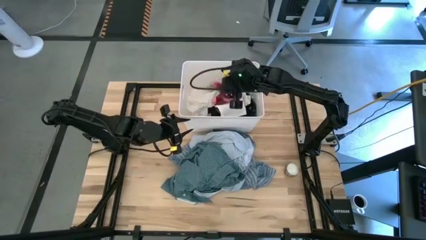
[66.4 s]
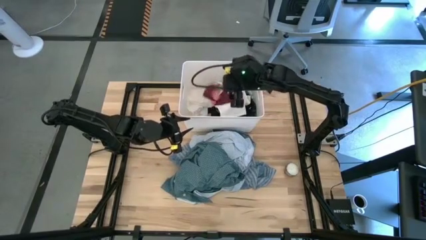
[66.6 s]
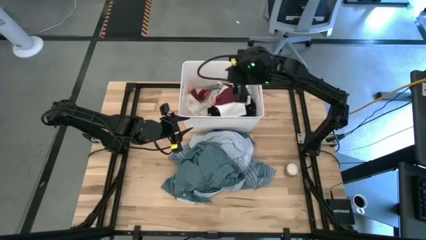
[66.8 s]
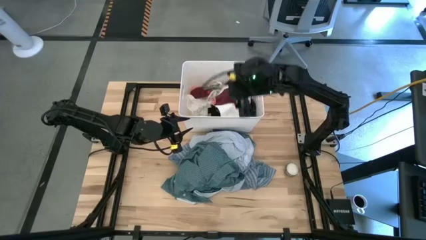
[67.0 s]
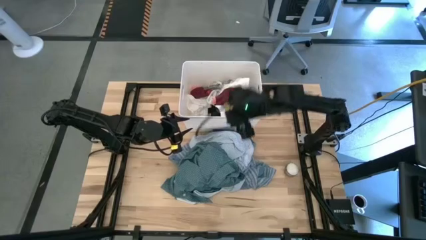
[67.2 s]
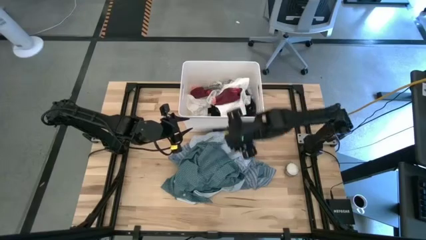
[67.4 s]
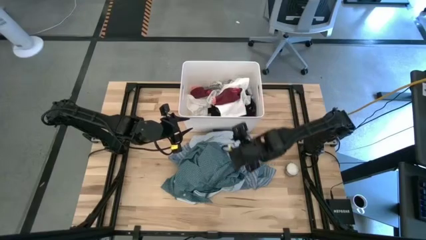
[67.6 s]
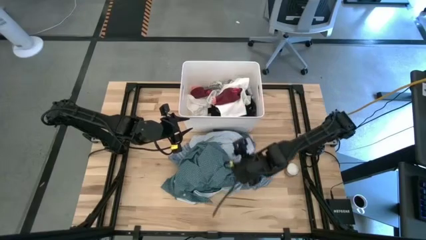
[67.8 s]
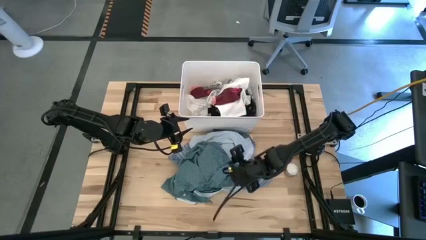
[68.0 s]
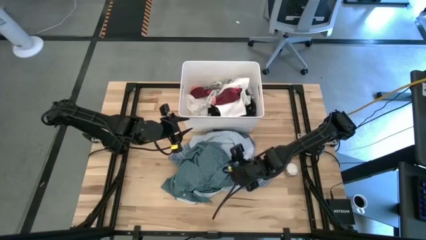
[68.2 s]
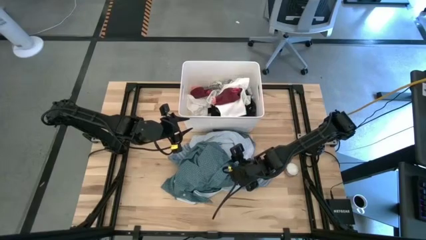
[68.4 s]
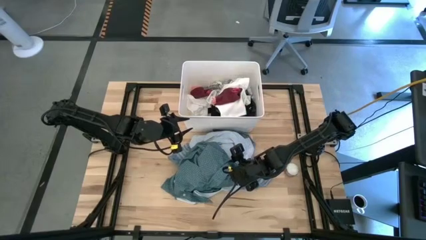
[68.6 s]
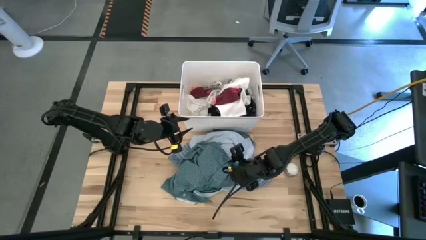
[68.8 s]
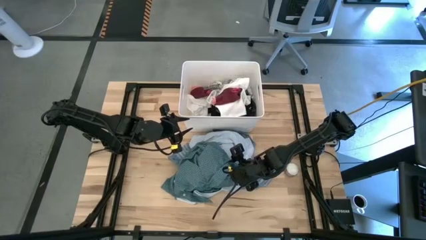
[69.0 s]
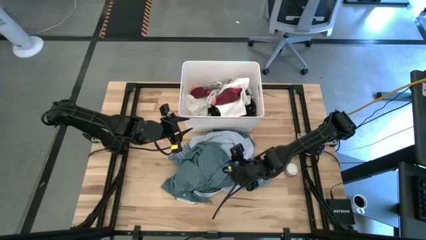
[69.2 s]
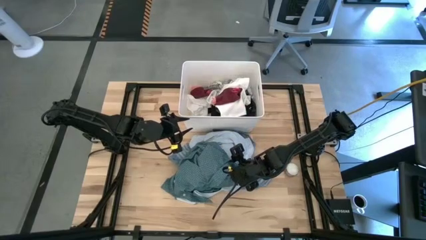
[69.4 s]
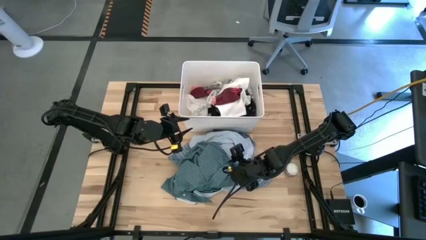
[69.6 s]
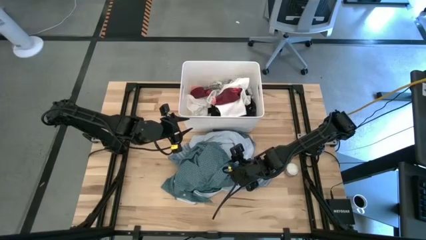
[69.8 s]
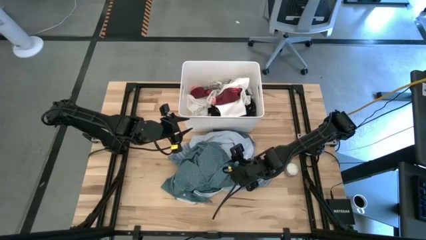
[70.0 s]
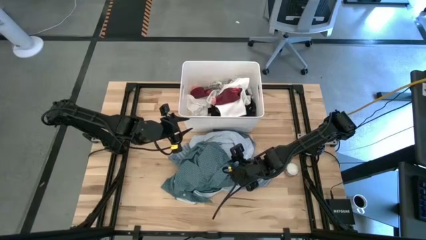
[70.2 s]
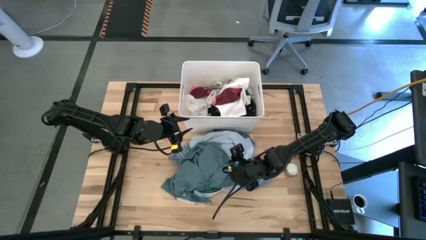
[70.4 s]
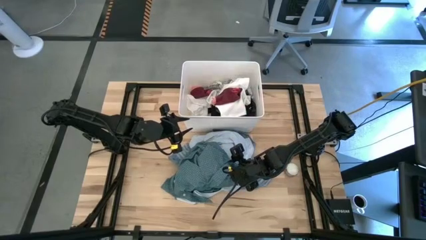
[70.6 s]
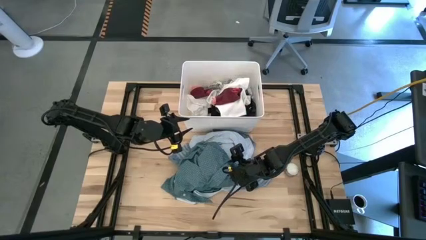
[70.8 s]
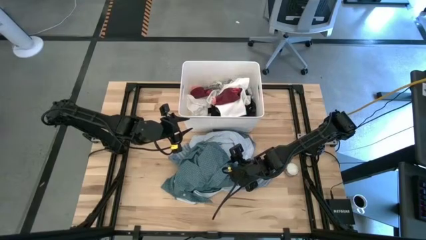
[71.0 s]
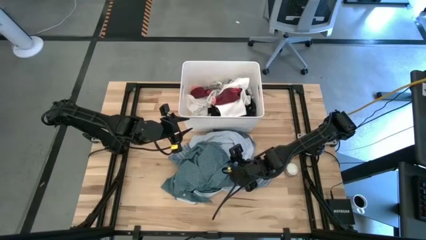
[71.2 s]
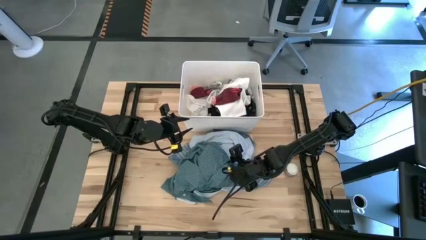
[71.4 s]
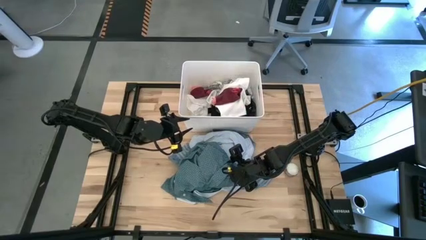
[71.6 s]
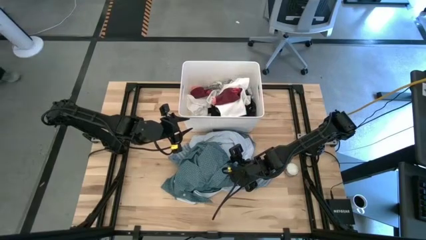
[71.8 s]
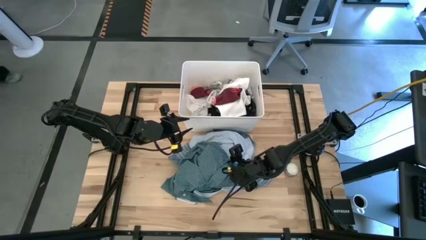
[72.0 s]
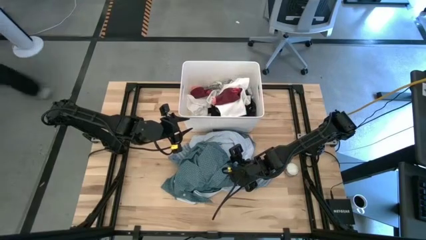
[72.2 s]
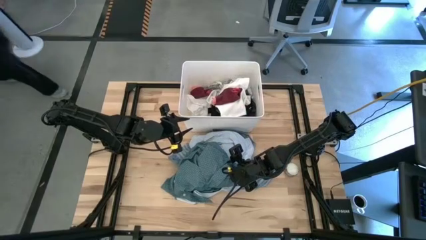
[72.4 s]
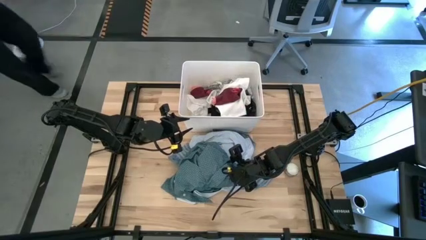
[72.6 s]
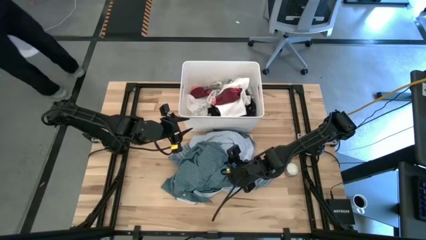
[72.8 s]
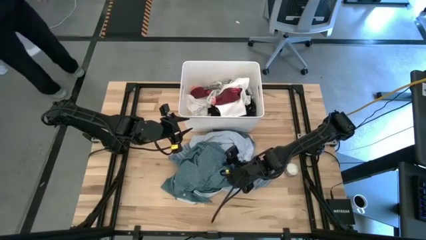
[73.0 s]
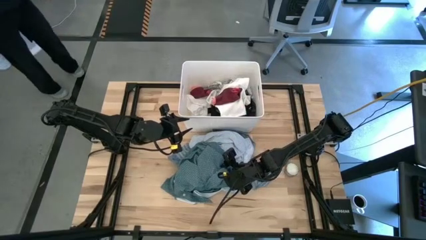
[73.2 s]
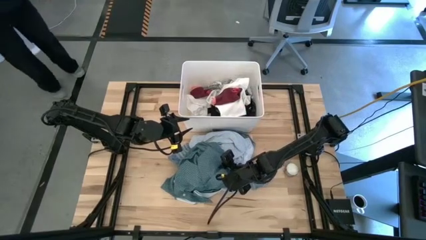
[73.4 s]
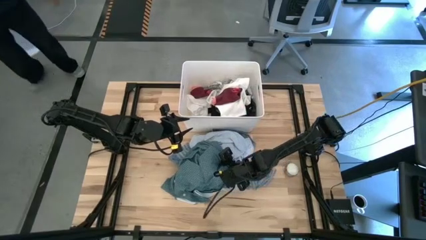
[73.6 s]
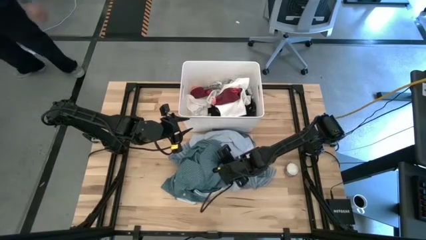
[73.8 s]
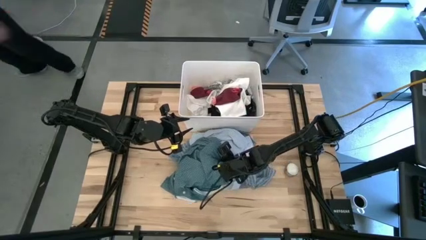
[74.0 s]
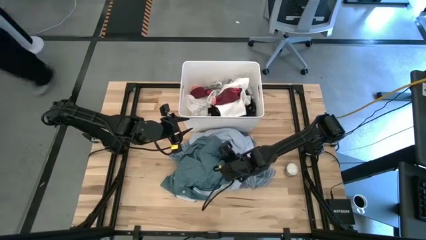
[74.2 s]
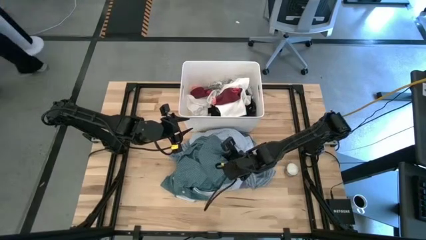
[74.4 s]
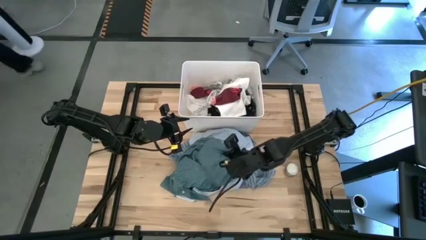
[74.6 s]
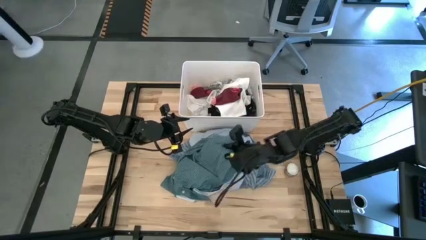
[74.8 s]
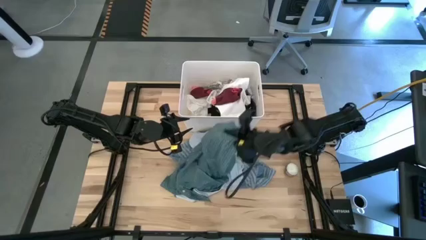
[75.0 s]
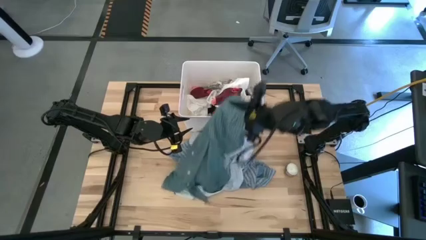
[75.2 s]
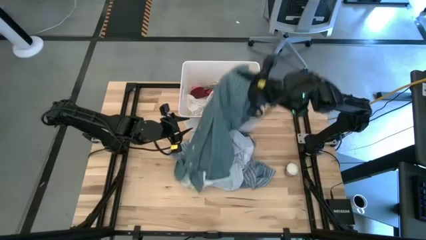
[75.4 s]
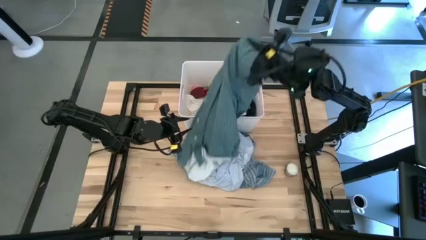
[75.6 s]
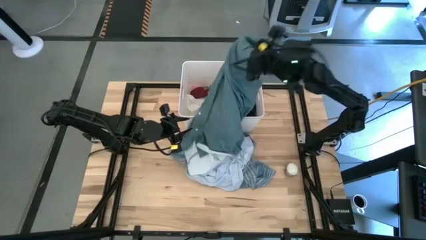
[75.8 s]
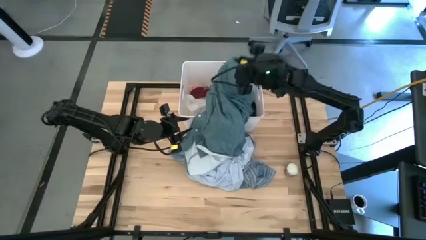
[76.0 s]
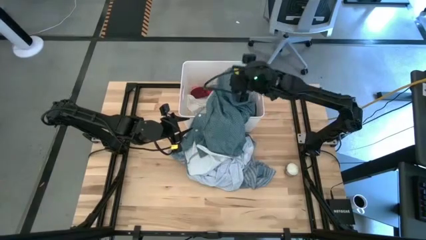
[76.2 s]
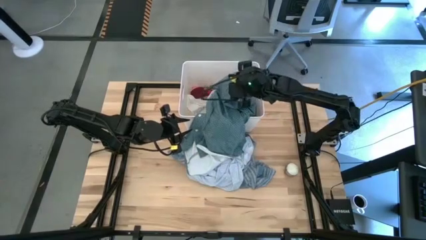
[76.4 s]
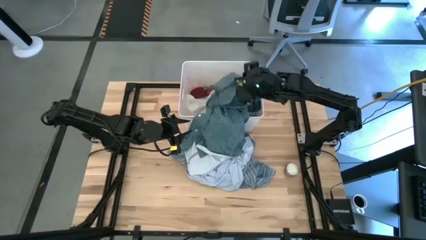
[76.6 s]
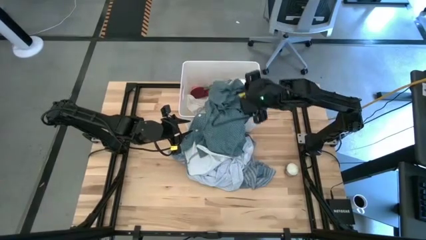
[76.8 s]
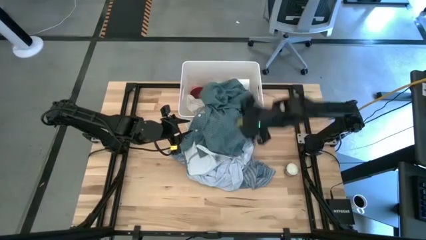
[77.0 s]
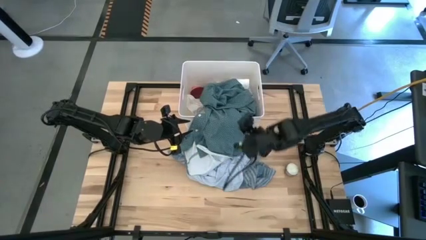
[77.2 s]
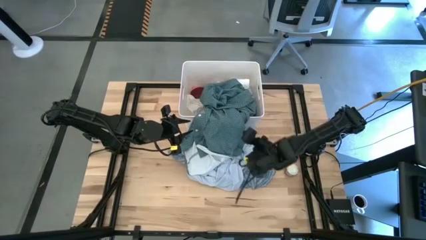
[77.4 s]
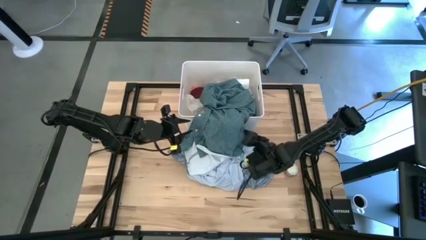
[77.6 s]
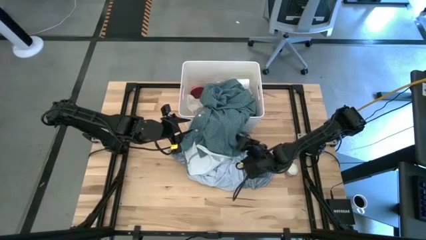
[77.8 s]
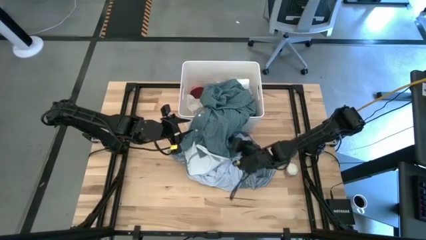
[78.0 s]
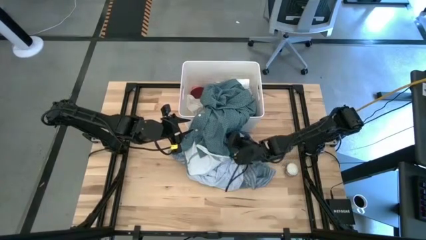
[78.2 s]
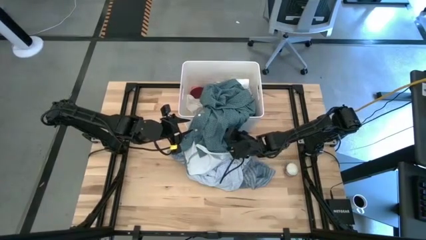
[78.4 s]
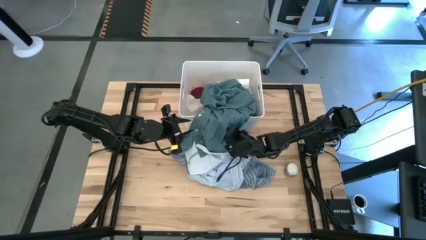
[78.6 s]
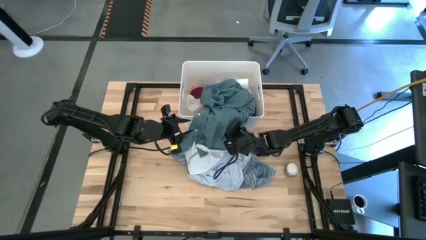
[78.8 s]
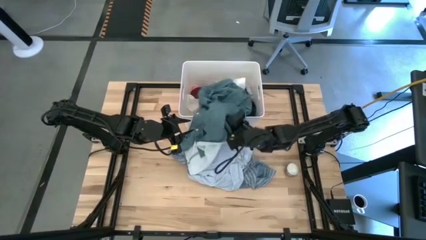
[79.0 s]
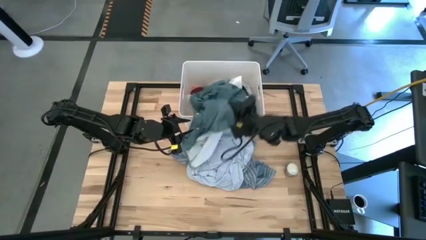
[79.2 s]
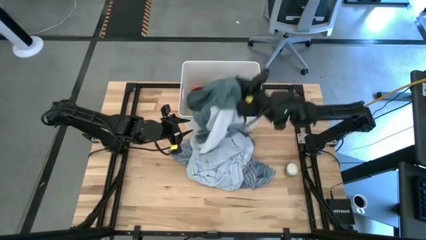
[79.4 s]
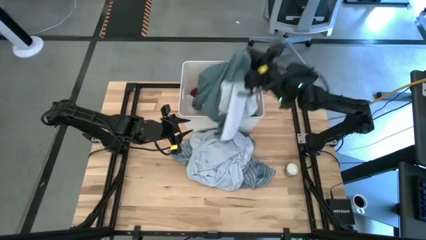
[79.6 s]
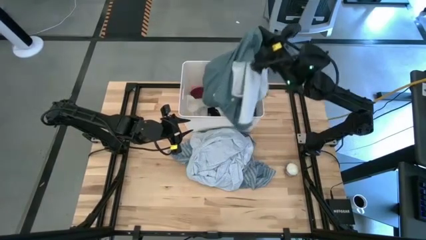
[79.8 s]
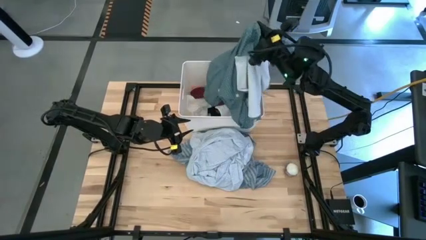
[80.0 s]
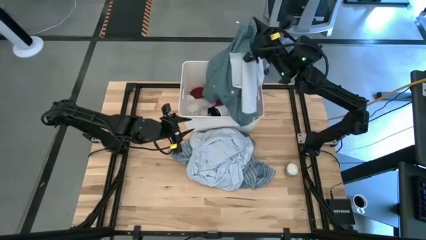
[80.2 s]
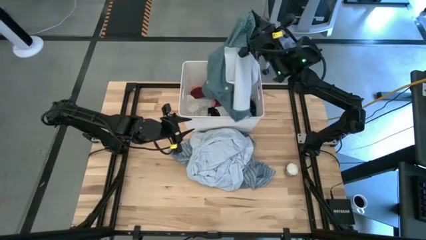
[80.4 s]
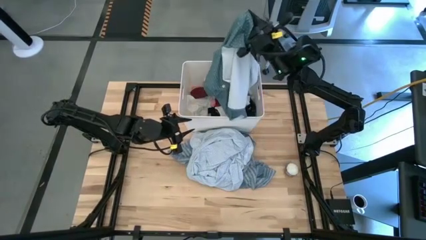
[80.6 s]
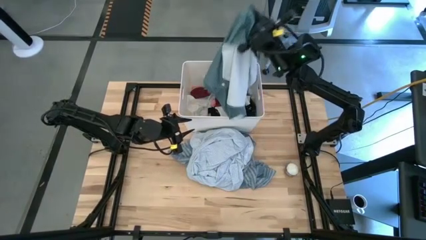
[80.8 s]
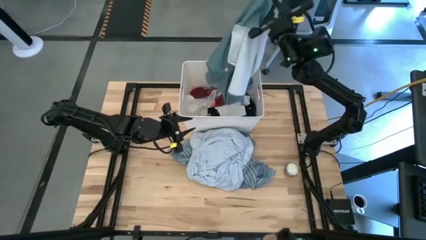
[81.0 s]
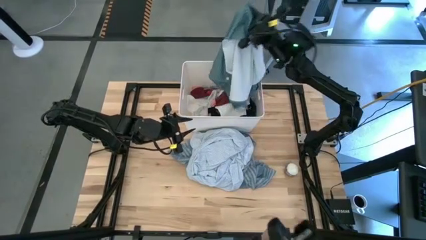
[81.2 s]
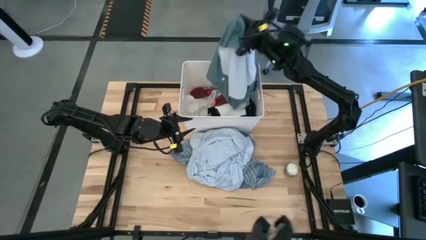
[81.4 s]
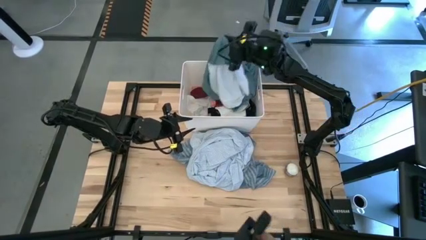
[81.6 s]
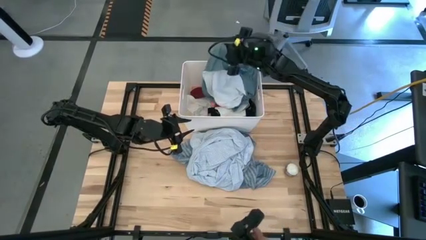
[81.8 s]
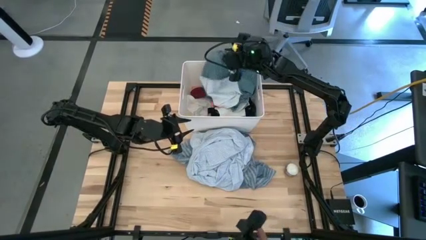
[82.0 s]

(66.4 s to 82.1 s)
Task: Sort clothes
Put the gray pattern shirt into the white bin

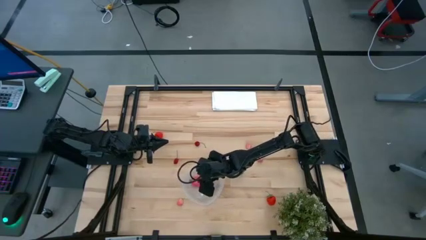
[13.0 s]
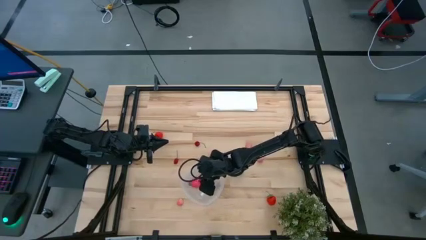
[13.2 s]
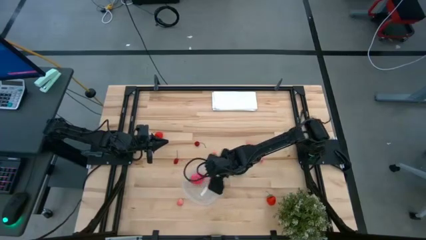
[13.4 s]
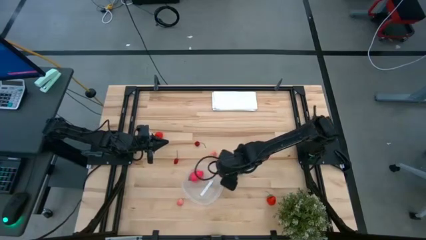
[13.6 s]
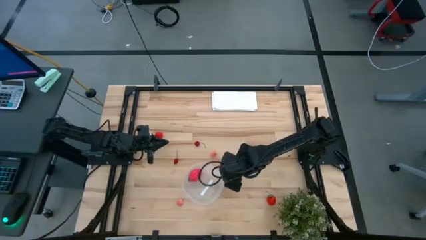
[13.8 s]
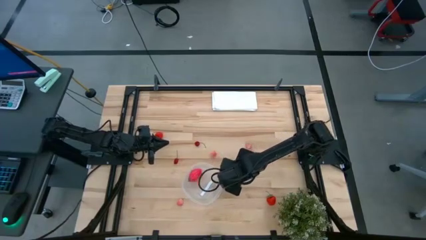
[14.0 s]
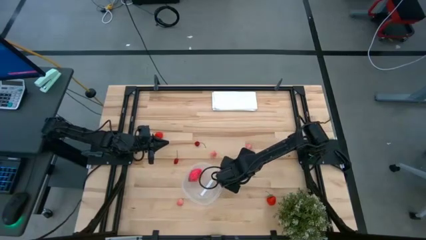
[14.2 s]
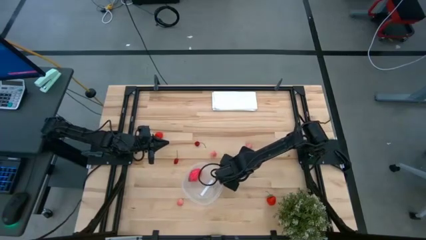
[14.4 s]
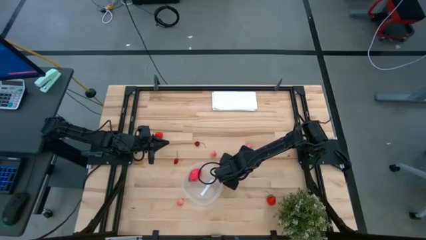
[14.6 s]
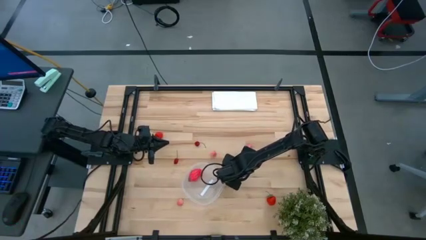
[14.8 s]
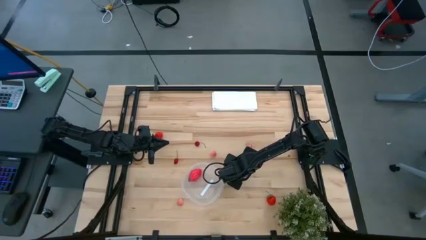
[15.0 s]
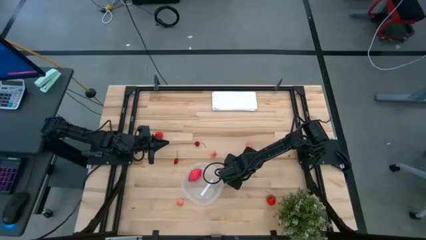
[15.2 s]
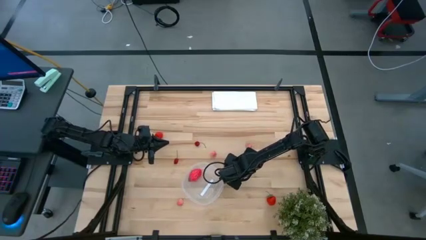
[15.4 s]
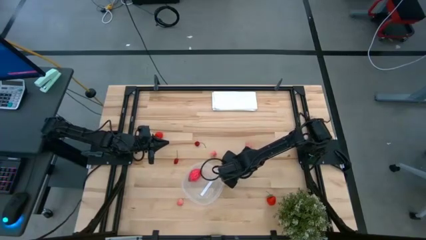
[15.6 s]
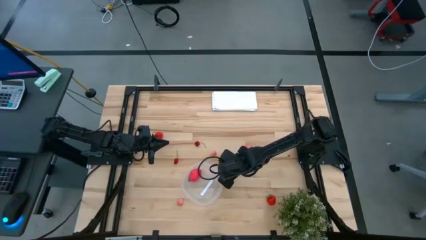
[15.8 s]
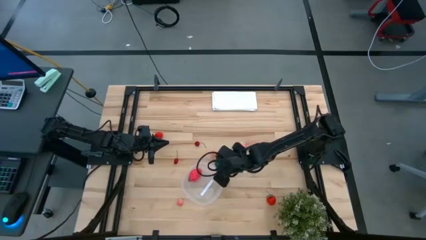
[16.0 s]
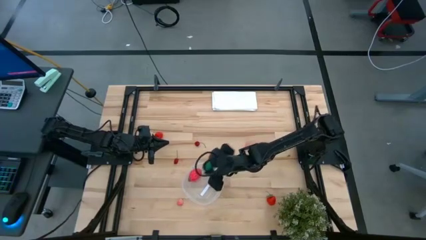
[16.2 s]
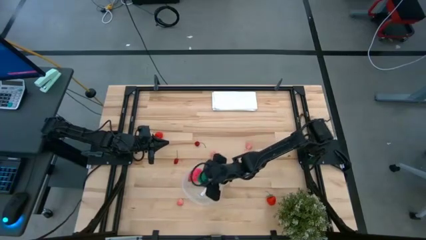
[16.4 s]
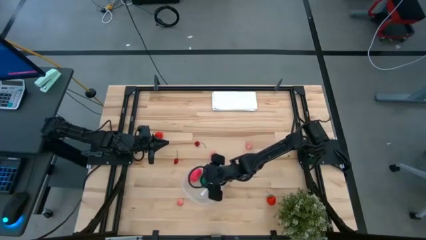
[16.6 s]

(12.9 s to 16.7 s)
Task: Pick and placing Produce into tupperware
Put the green bell pepper into the transparent bin
